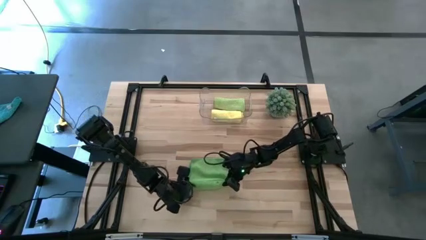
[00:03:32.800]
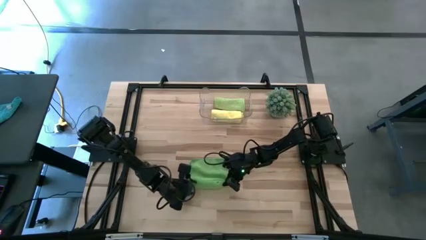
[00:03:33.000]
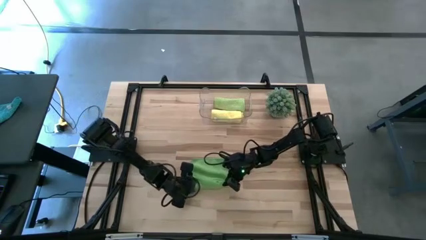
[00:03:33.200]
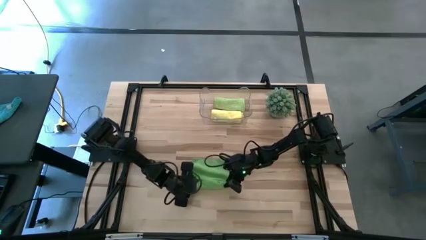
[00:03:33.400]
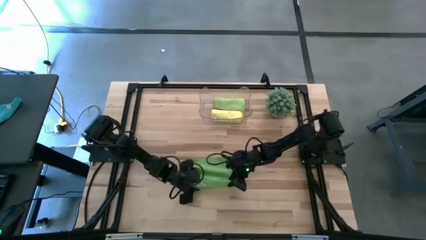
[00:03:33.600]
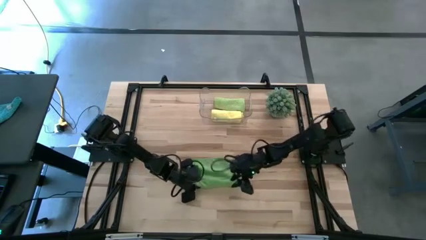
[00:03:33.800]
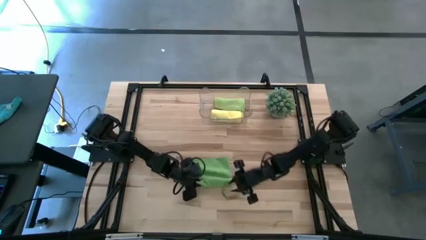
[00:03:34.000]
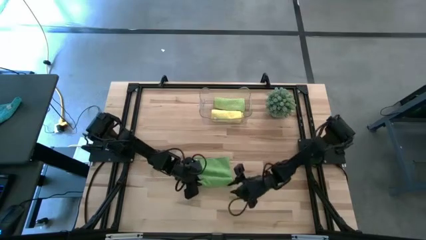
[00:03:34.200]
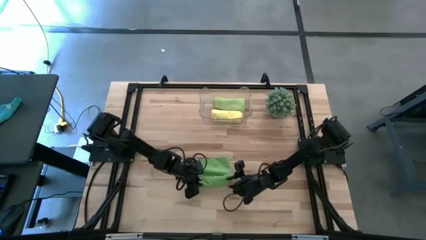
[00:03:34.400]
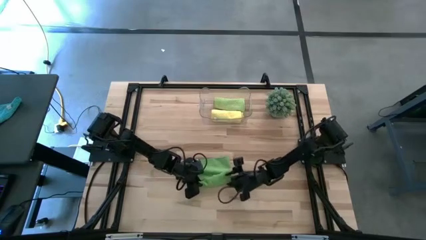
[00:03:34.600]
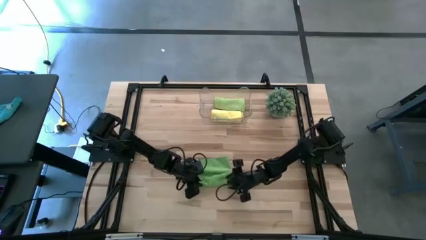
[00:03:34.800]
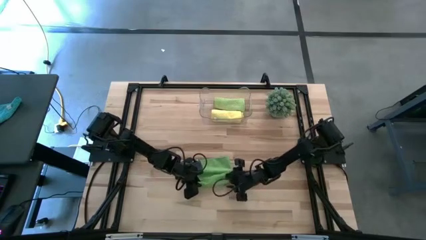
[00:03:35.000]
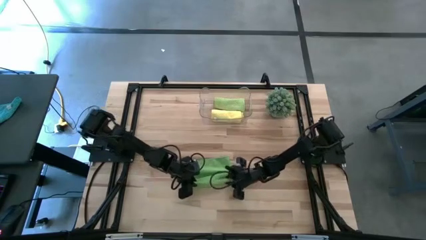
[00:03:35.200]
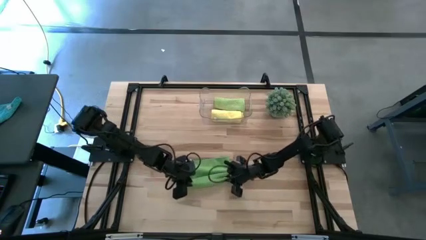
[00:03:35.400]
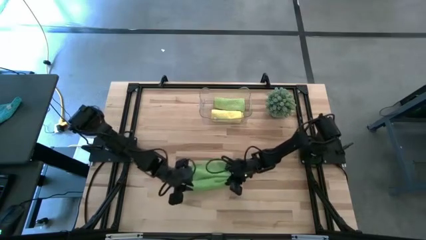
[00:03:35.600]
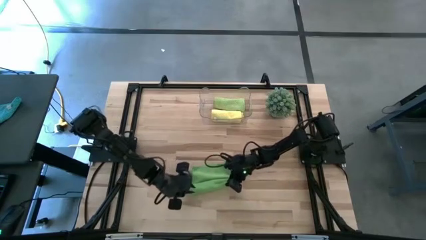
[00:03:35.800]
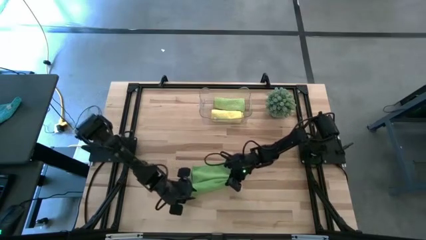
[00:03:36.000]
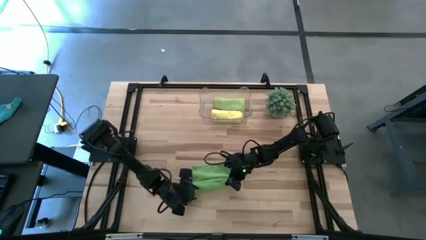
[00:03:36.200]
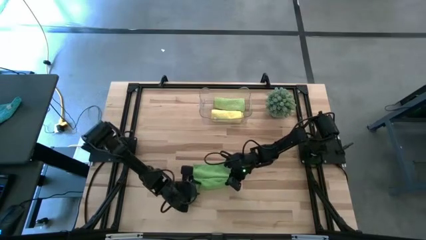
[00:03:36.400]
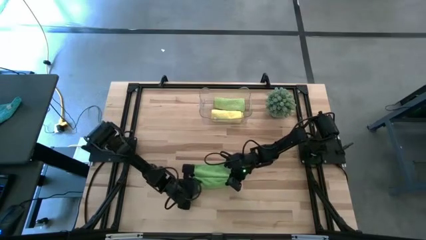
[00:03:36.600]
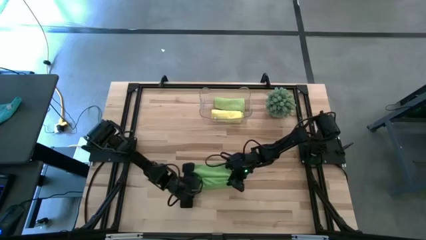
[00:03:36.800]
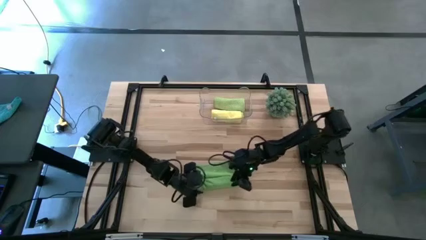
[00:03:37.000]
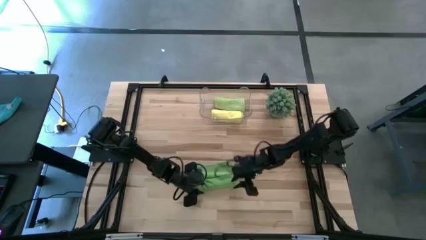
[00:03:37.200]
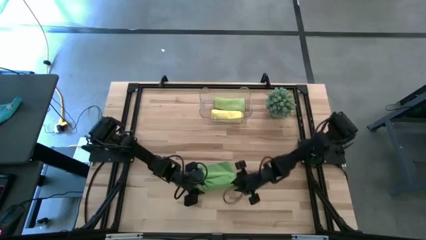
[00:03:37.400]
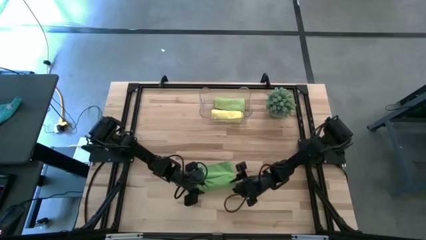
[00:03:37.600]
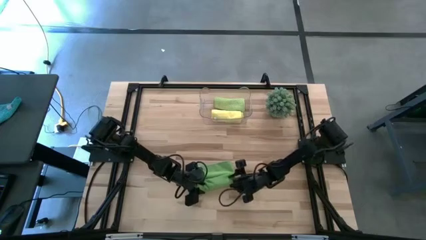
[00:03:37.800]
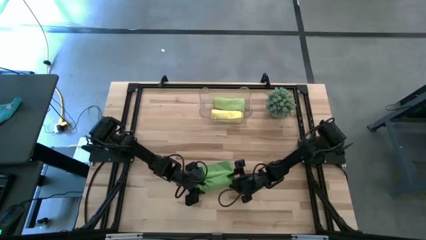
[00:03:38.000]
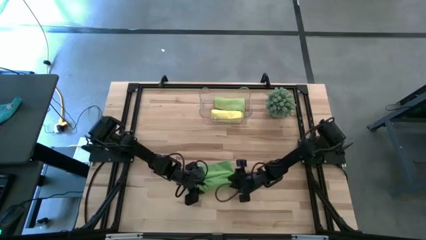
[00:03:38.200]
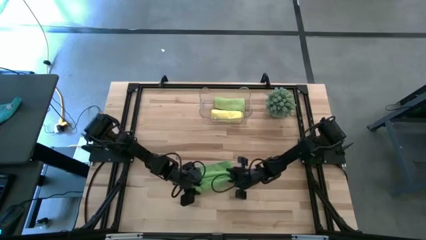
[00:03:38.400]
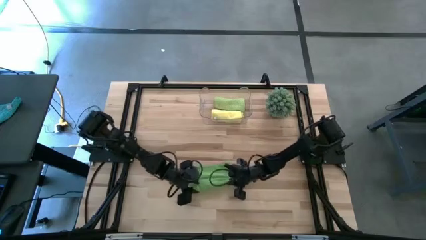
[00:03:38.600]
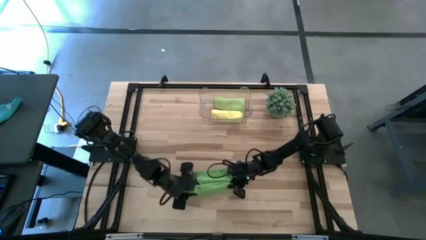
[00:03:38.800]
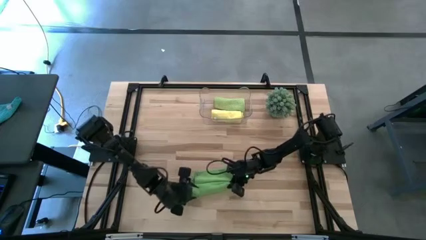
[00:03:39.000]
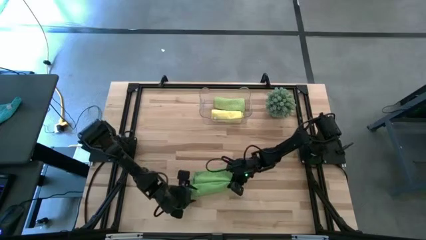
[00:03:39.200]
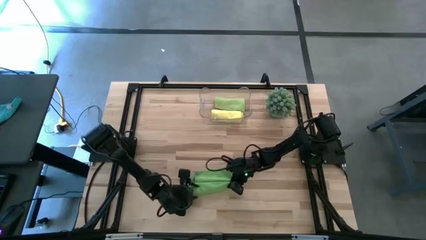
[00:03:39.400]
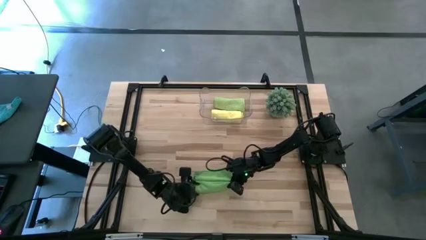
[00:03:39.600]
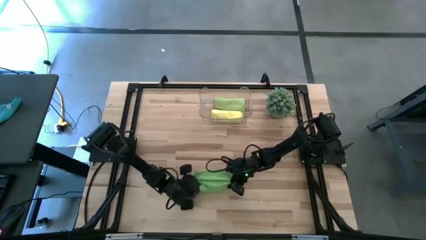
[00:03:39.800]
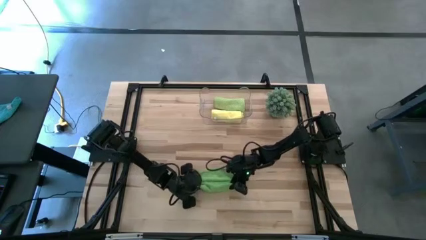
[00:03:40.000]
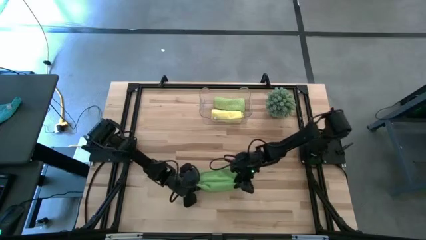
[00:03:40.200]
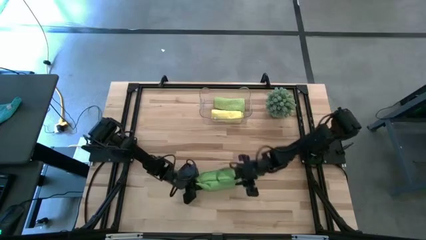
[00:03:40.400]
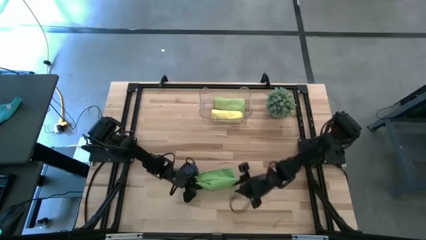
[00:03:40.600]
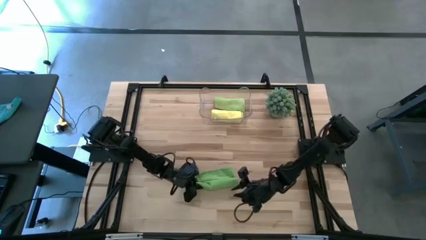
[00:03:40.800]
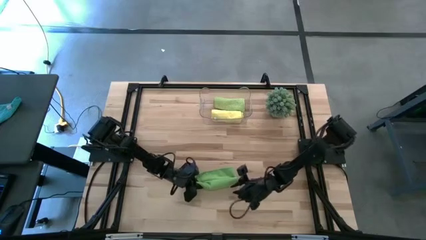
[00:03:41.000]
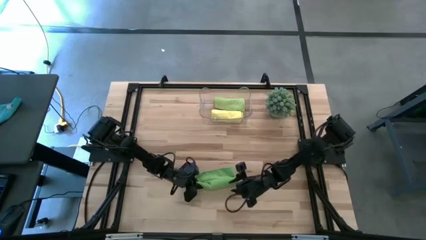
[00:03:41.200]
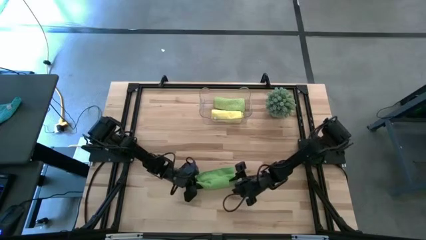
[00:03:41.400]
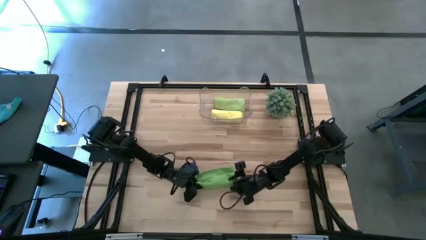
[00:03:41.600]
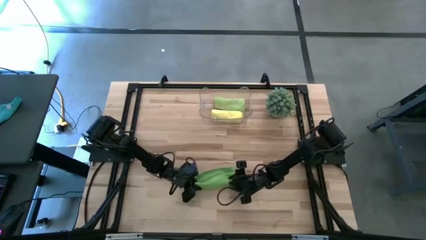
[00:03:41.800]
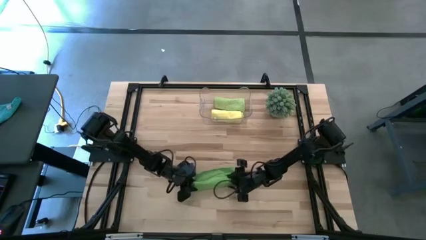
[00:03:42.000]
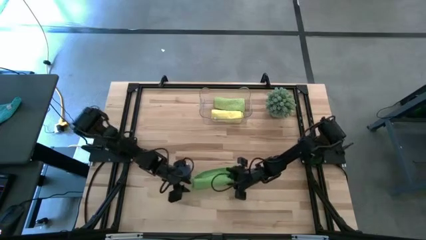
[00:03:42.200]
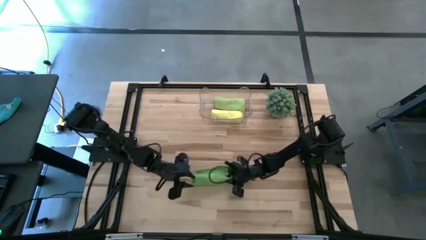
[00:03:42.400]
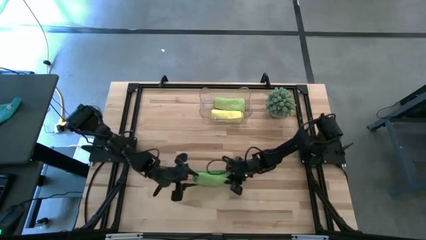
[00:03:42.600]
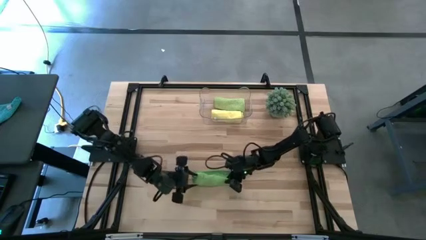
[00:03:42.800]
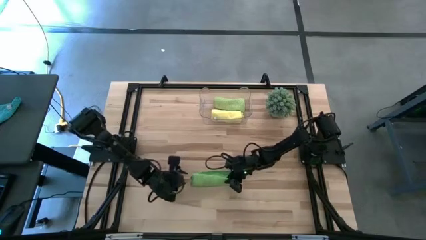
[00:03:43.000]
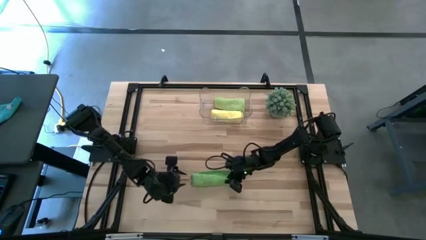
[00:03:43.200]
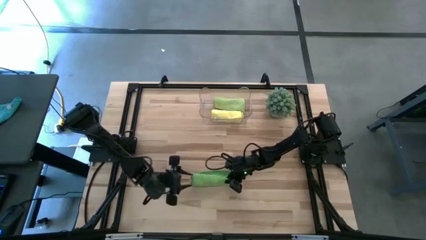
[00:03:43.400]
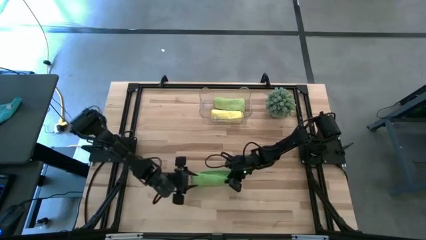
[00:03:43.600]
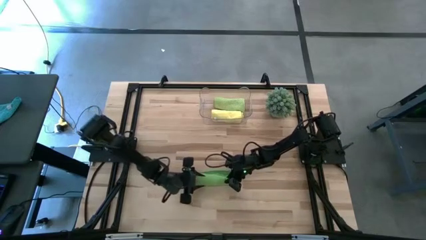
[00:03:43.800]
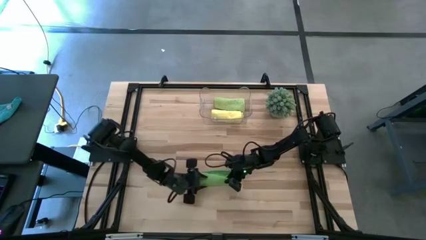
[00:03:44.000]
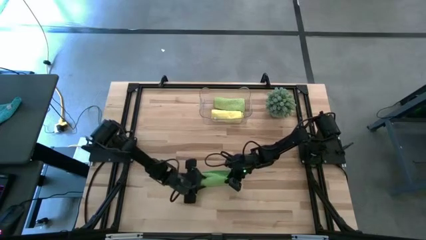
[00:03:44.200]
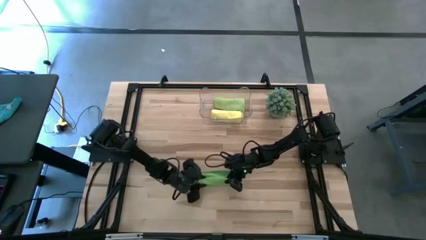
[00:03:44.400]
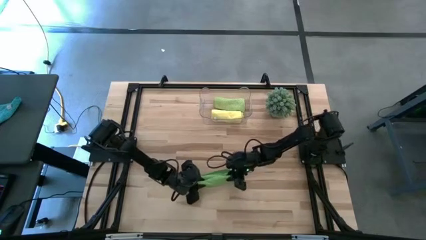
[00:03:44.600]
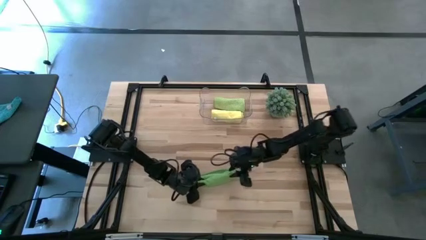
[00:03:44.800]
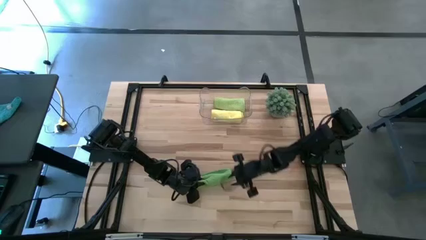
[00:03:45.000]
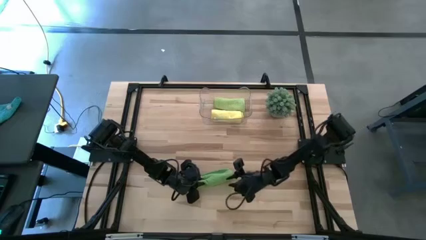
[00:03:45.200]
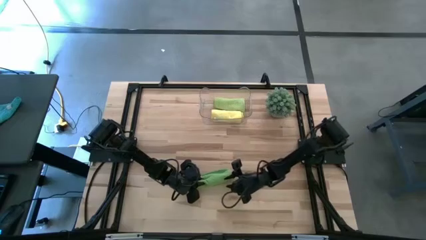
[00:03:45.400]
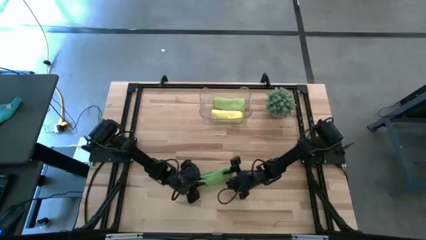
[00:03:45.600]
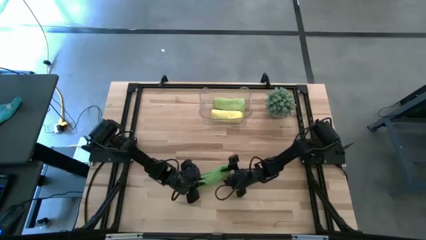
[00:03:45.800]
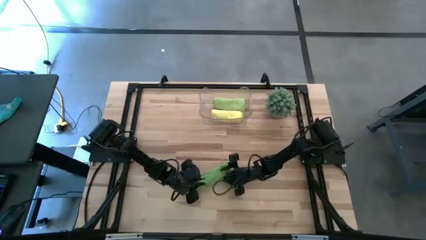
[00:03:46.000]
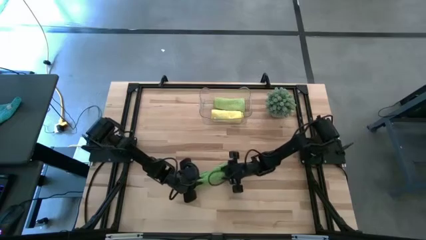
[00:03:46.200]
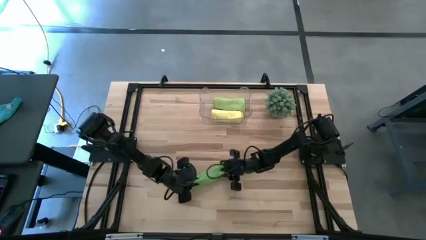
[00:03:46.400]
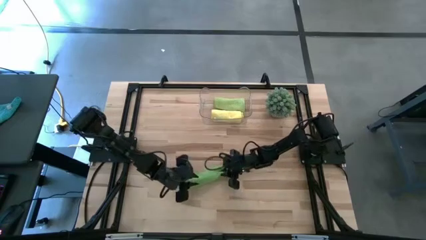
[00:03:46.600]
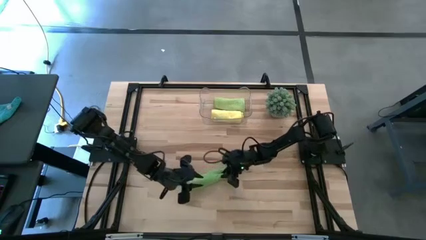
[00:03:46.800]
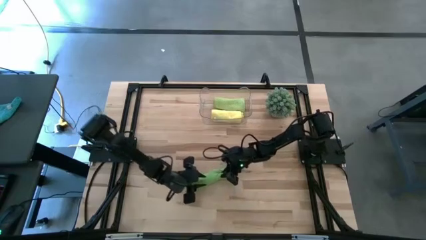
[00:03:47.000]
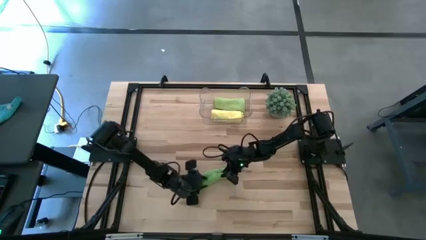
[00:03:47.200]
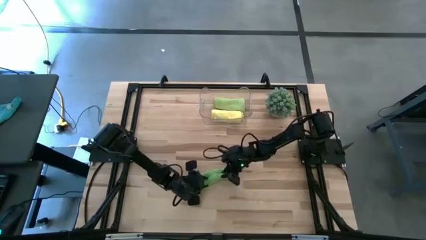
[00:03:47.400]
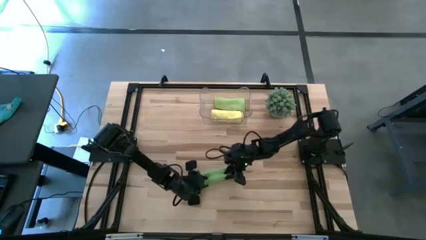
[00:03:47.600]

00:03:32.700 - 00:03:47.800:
Task: Roll microfiber towels into tight, uniform cylinder then place into a basket
Roll the green microfiber towel

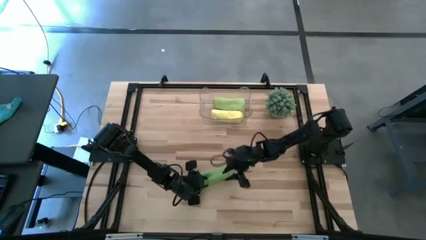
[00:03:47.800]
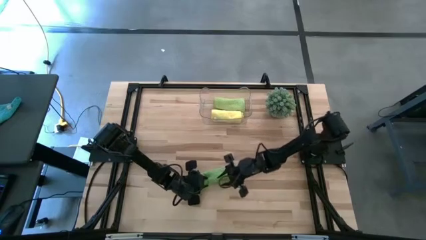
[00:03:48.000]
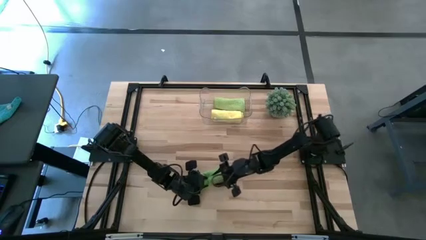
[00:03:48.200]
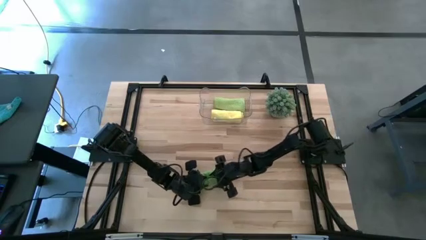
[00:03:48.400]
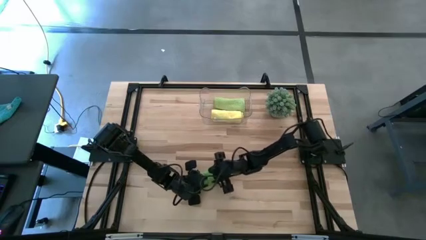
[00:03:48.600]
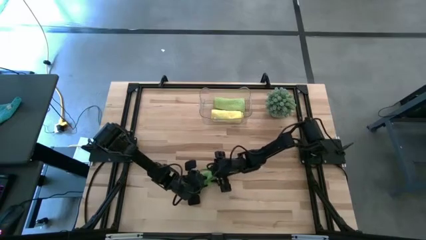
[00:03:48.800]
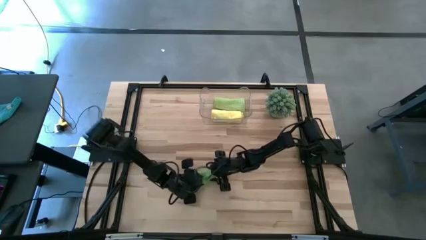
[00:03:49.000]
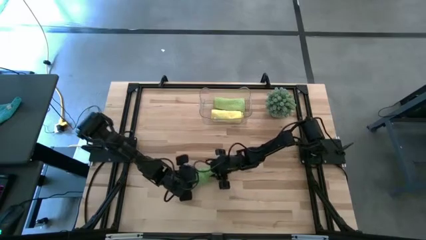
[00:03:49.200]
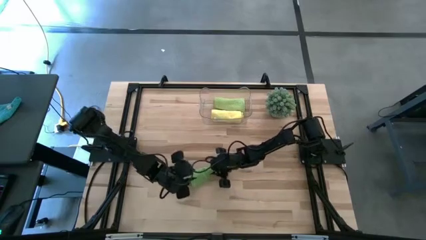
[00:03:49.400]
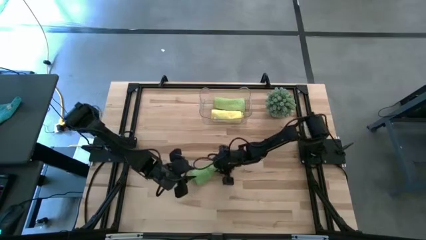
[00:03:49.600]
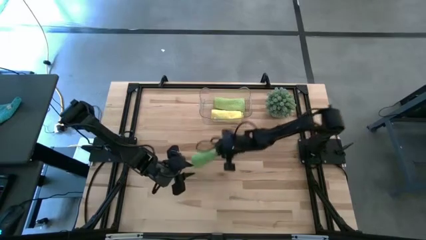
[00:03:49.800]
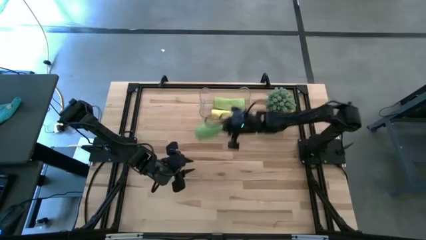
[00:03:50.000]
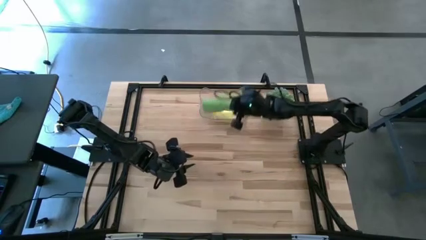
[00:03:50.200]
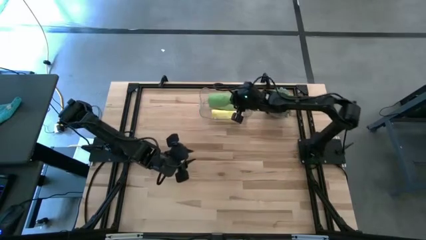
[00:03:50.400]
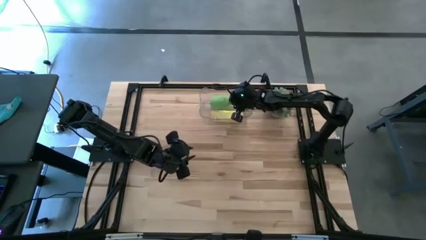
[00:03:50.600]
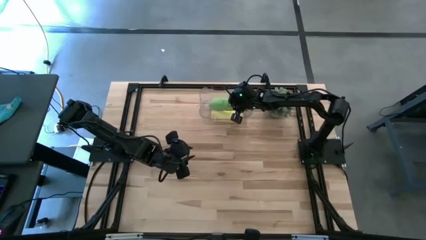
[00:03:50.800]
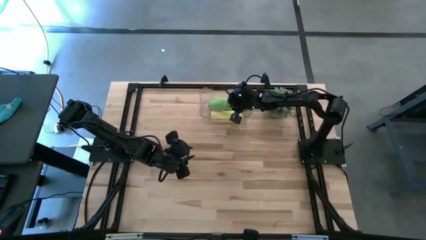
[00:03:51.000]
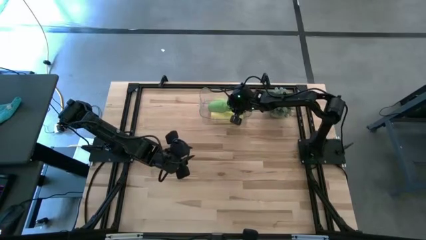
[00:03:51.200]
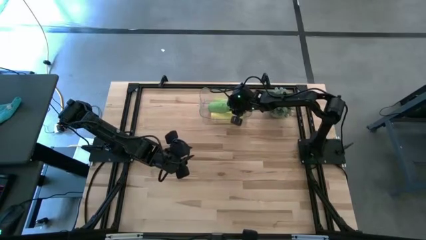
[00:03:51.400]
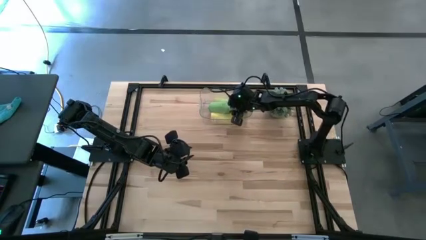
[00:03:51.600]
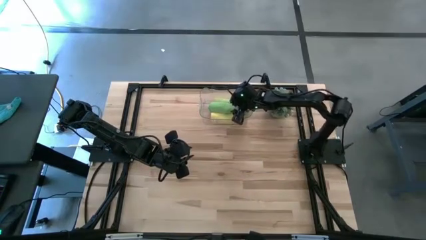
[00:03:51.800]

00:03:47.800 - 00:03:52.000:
Put the rolled green microfiber towel into the transparent bin
